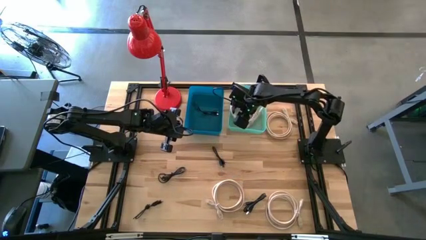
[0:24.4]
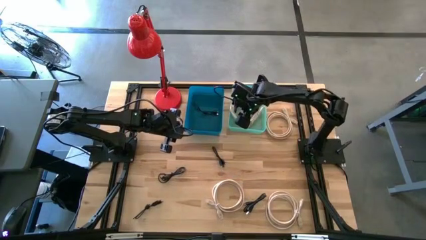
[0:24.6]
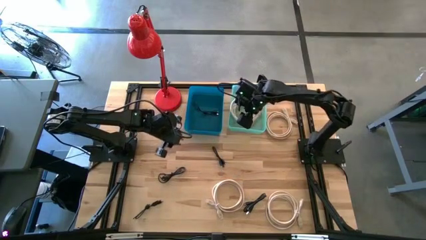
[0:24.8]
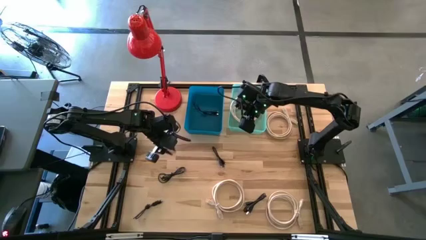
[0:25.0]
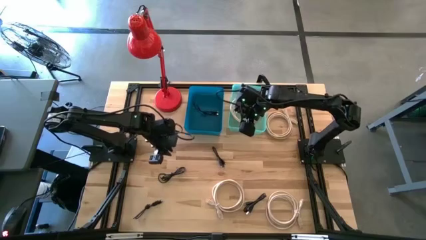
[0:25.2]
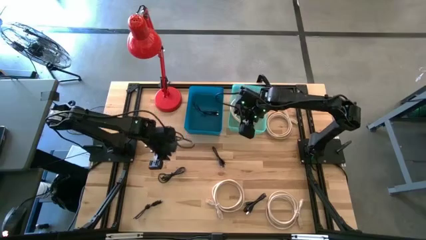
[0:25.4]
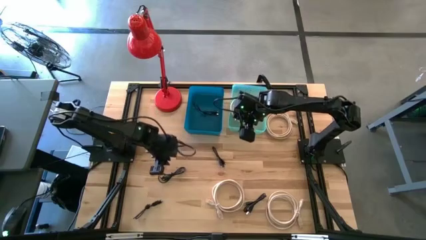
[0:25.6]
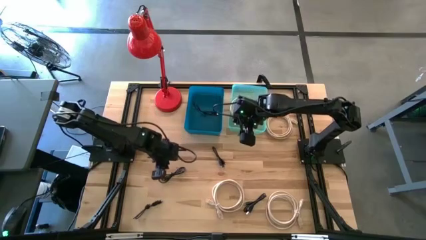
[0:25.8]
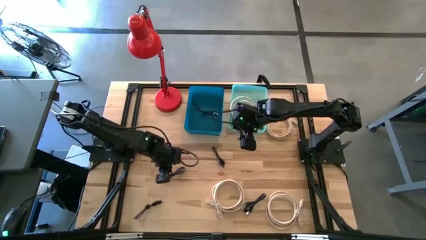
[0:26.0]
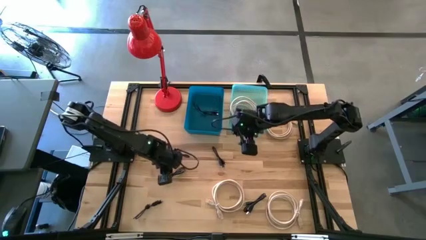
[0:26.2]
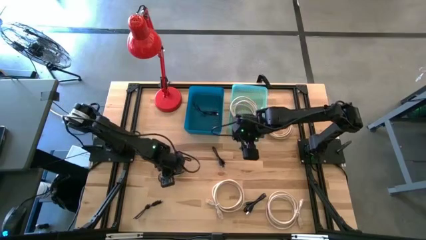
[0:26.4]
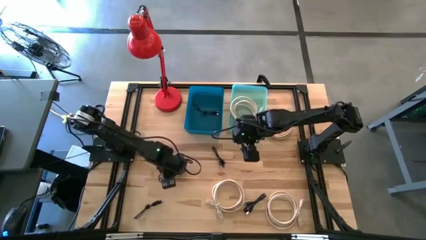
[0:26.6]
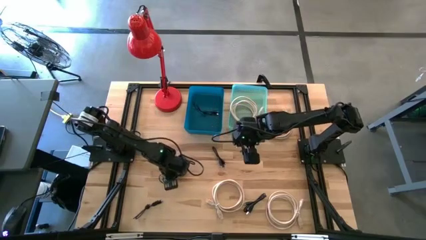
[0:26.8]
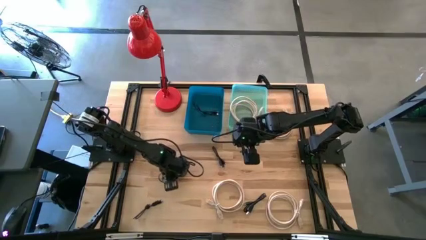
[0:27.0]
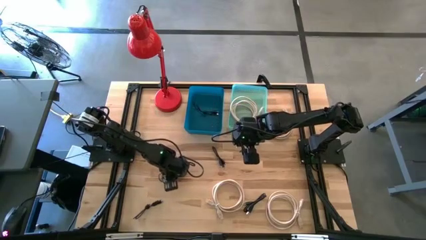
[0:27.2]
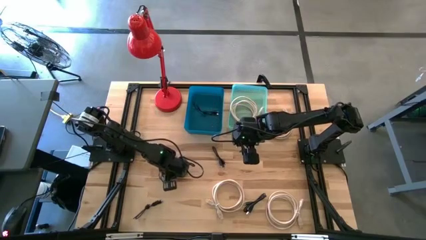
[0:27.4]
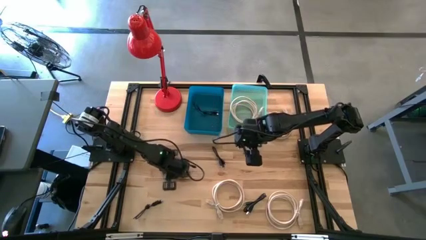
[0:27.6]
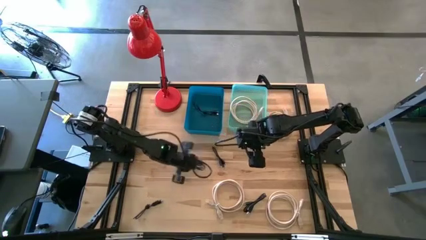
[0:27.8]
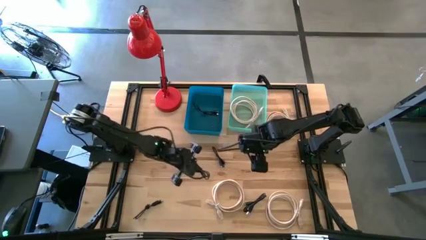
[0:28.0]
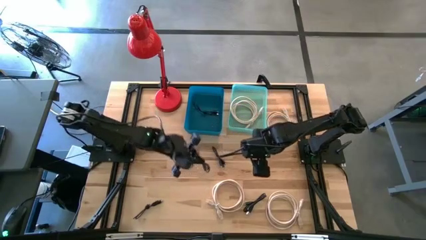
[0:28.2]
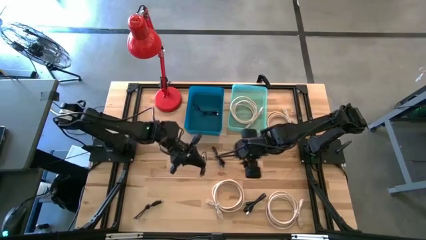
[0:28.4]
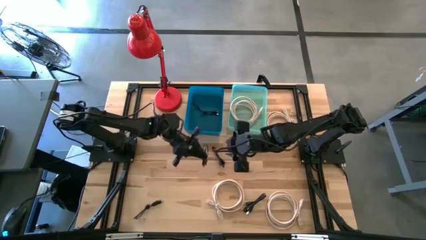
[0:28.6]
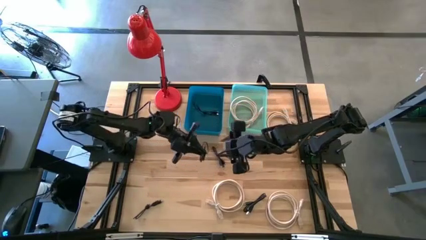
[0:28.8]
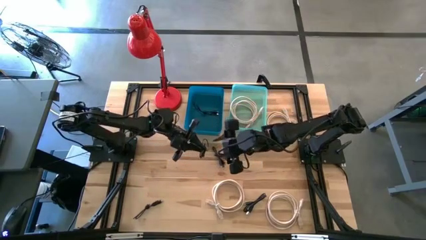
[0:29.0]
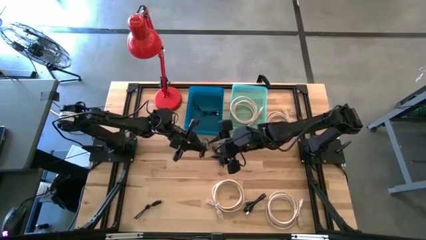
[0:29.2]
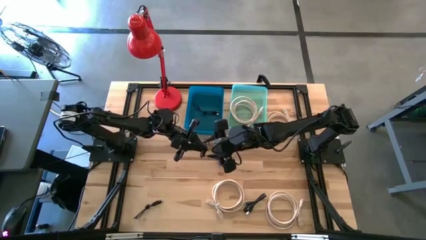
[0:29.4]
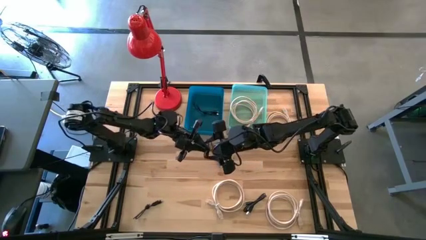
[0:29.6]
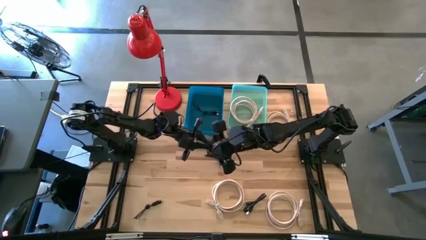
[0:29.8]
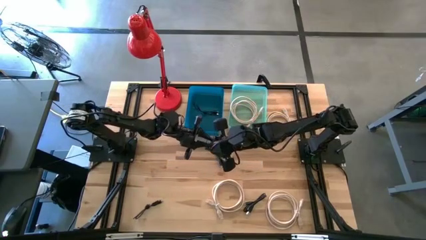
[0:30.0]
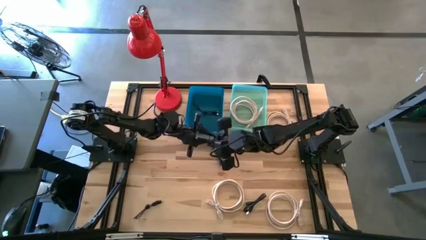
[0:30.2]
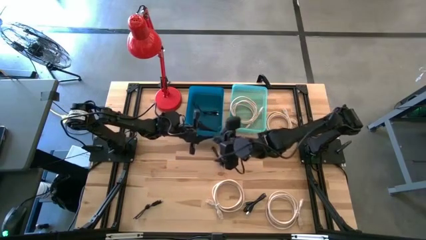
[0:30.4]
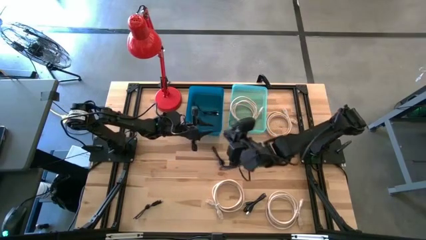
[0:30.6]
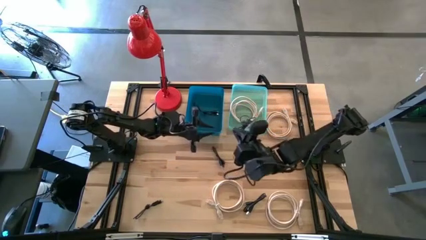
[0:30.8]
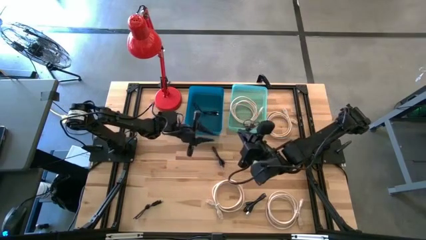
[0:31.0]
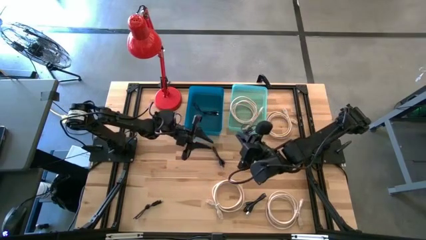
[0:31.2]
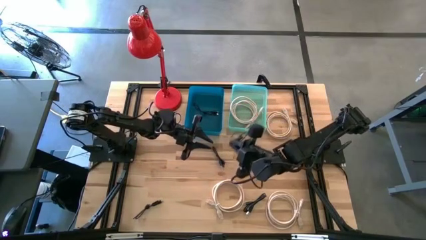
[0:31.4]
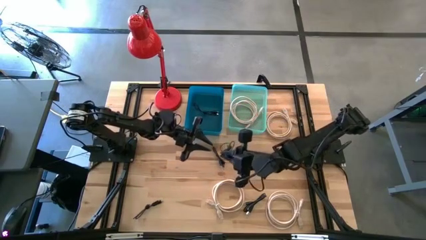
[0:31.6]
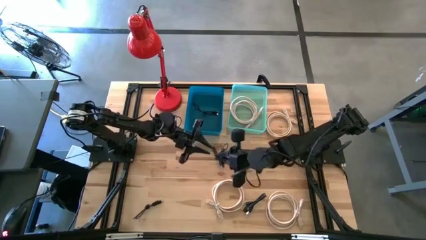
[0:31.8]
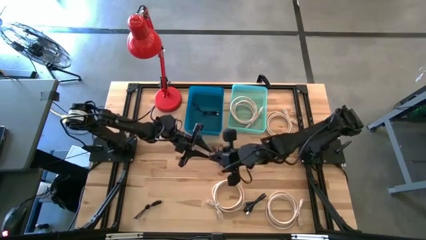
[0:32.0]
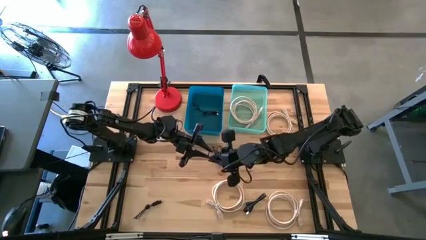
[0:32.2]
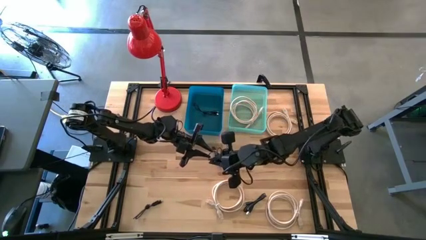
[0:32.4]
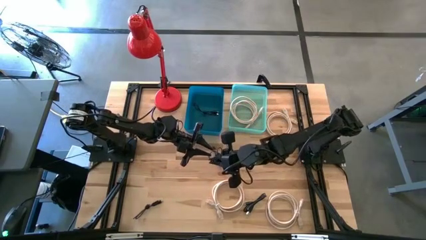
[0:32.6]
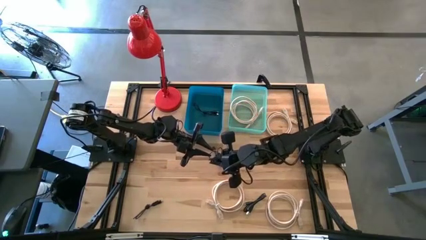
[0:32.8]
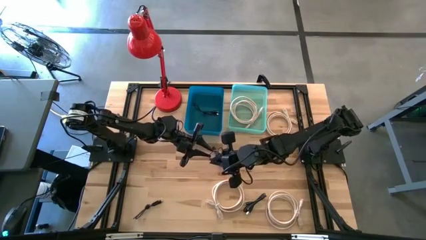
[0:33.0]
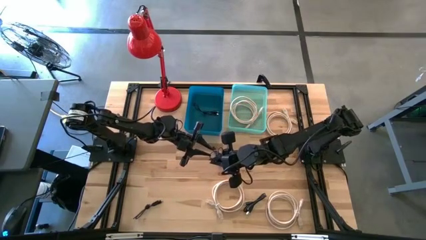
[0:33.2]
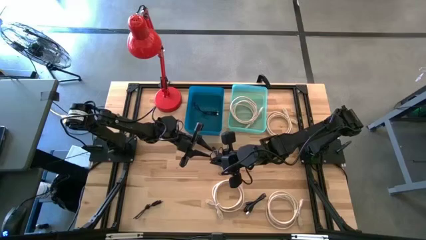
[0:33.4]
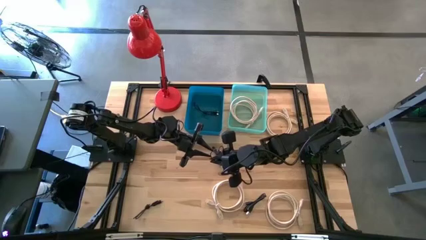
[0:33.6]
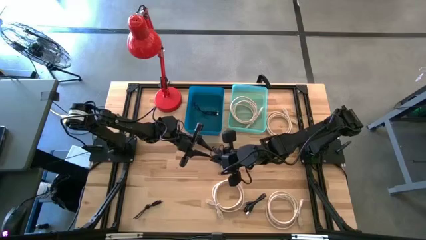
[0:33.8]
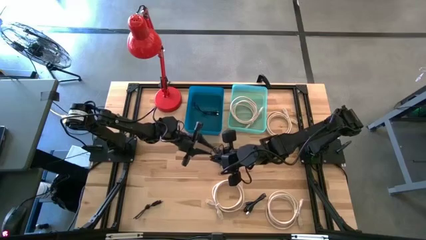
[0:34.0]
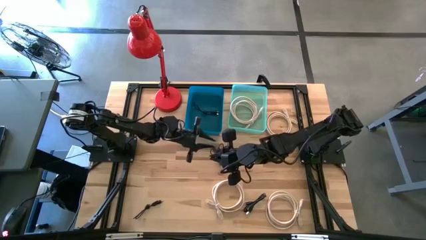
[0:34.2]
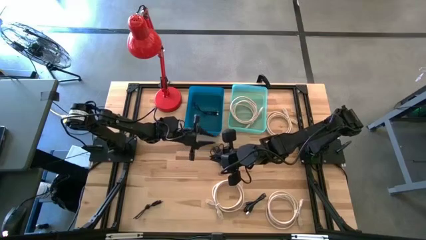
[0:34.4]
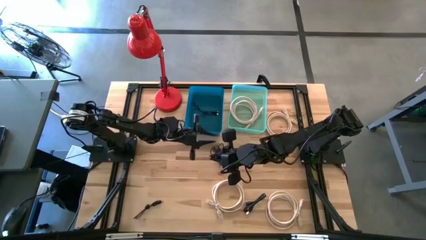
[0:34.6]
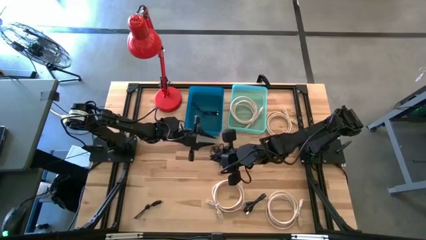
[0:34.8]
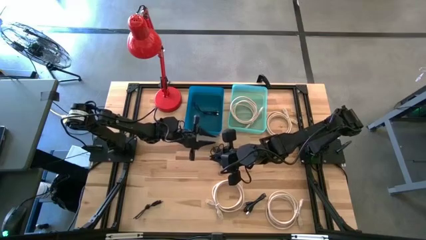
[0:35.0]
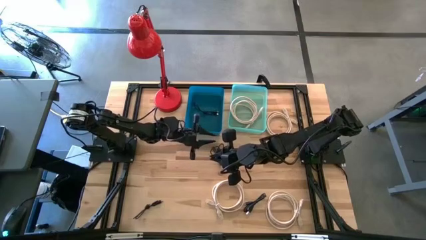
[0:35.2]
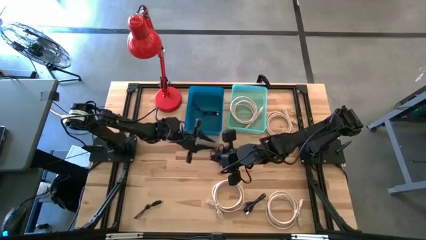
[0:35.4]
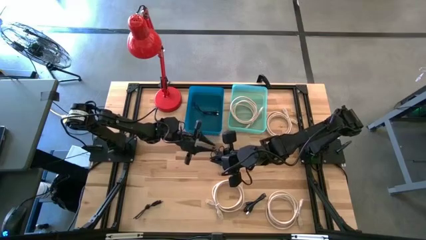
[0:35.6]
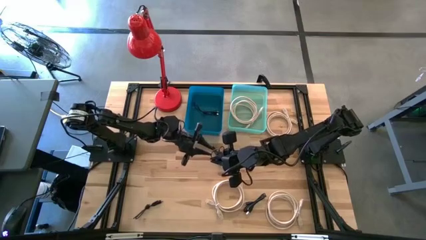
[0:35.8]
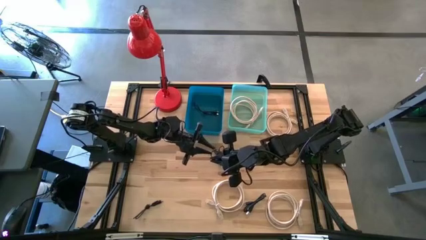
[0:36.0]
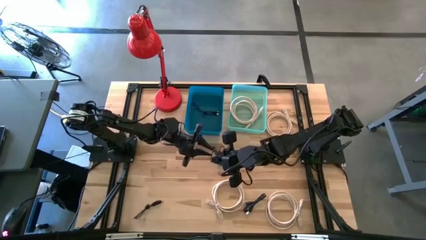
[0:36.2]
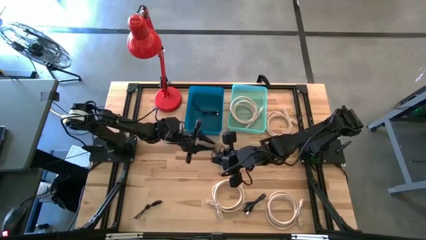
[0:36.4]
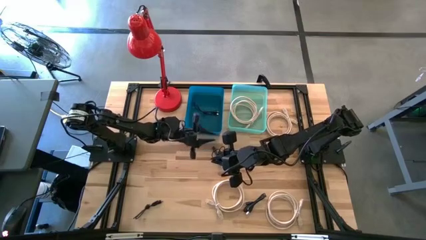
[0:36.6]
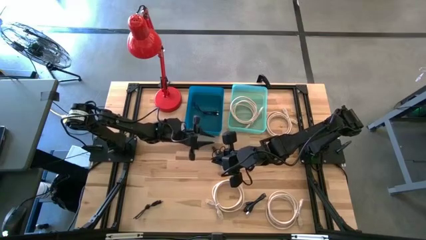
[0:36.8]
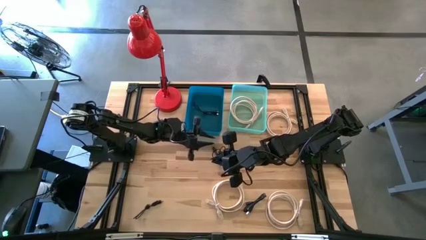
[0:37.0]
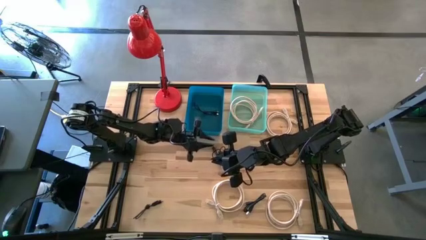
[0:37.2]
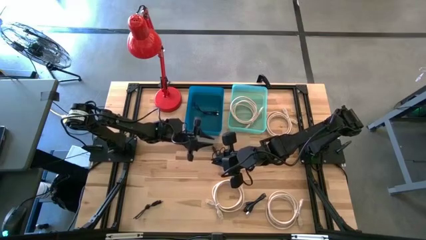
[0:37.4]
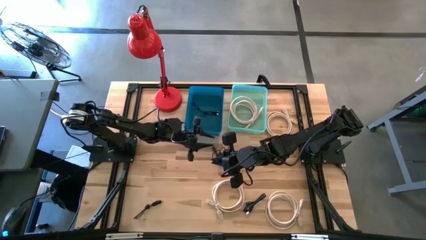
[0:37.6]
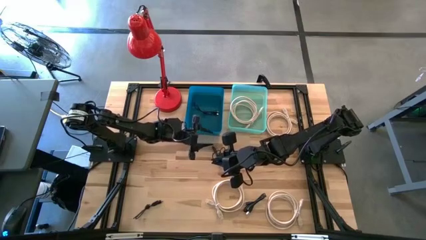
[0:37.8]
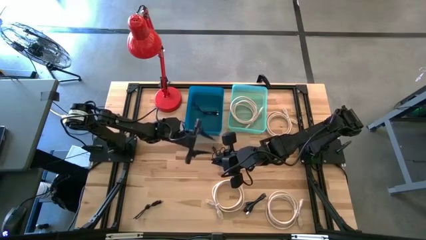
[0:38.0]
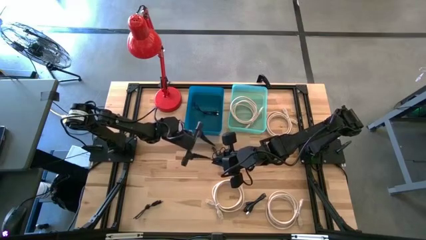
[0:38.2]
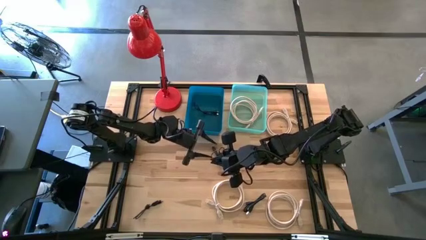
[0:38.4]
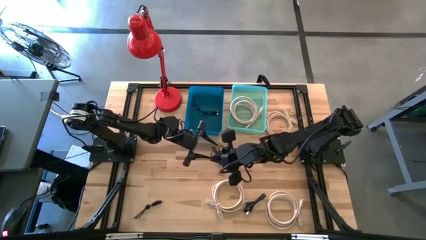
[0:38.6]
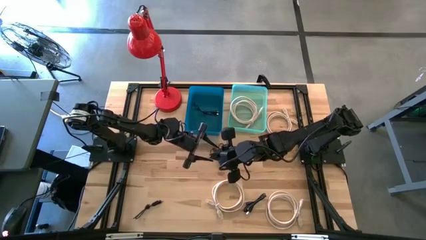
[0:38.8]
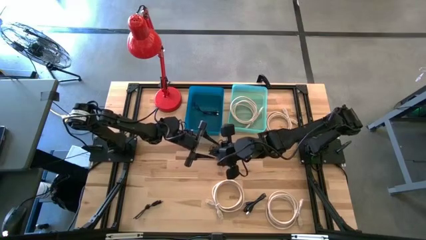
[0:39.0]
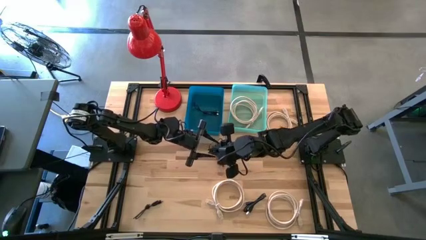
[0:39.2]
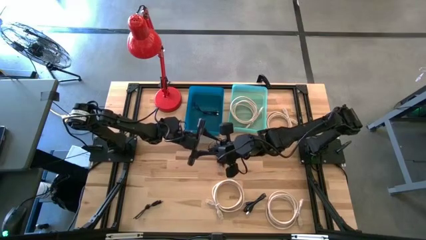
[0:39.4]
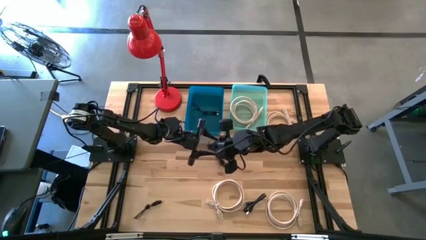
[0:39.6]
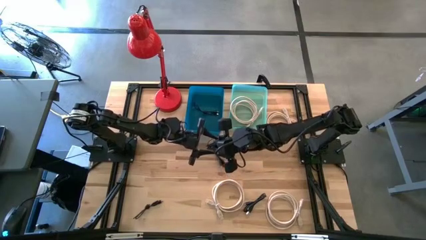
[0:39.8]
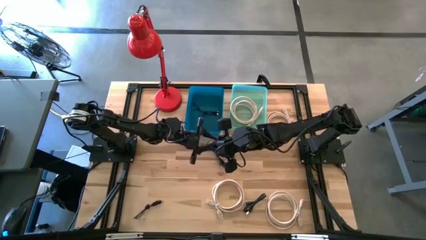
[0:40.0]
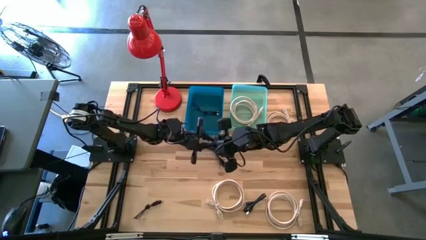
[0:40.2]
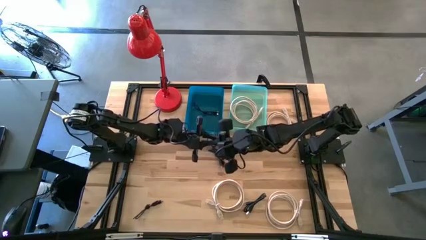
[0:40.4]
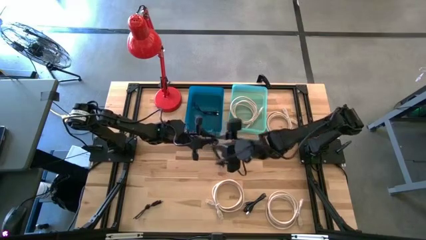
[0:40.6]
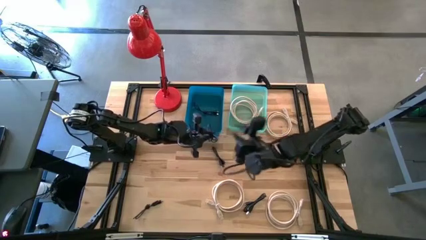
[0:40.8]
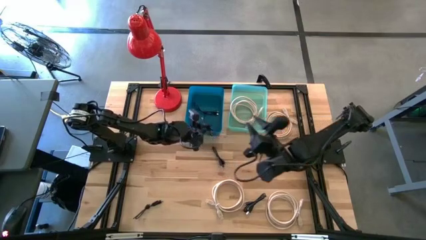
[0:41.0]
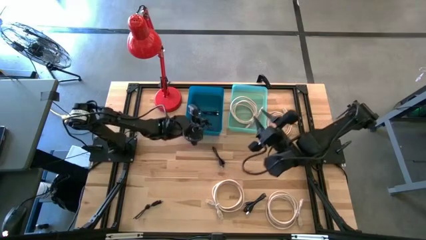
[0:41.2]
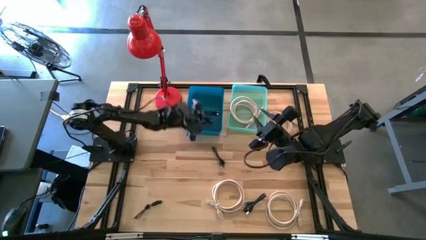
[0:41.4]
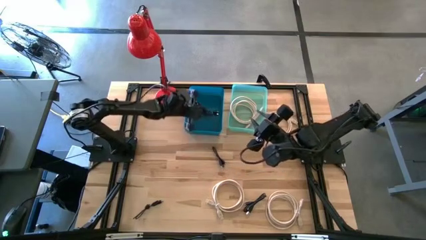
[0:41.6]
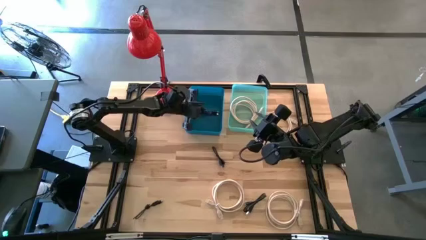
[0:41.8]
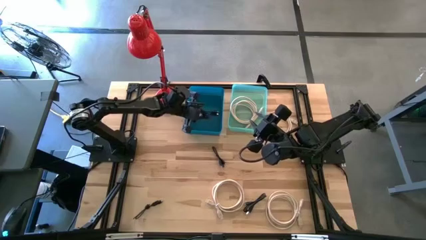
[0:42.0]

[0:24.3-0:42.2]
Task: Pick & Place USB Port
Put the black charger cable into the blue bin
